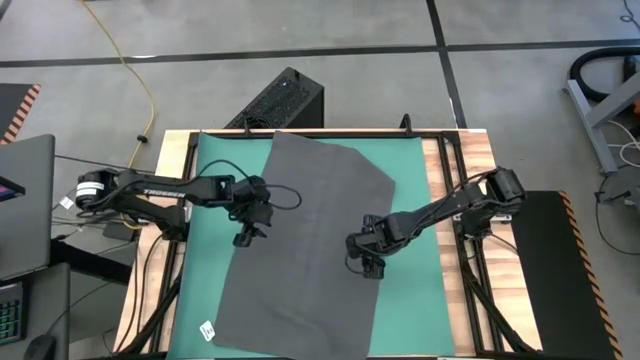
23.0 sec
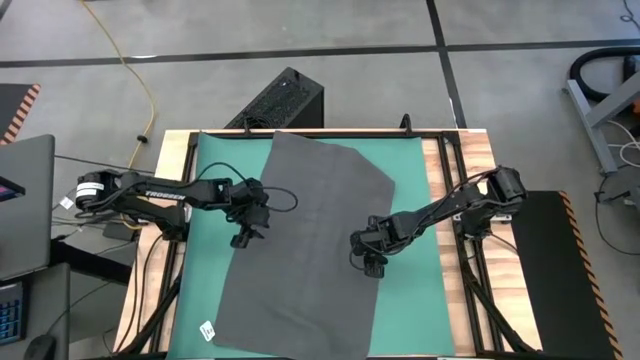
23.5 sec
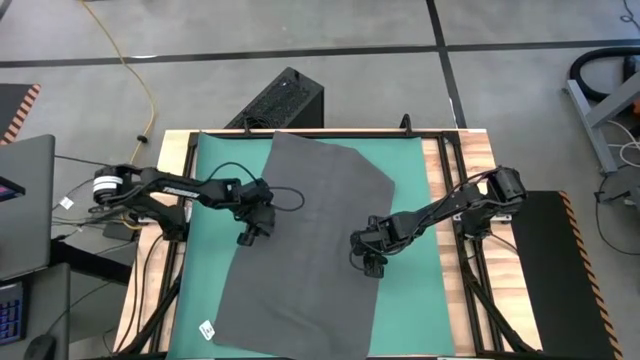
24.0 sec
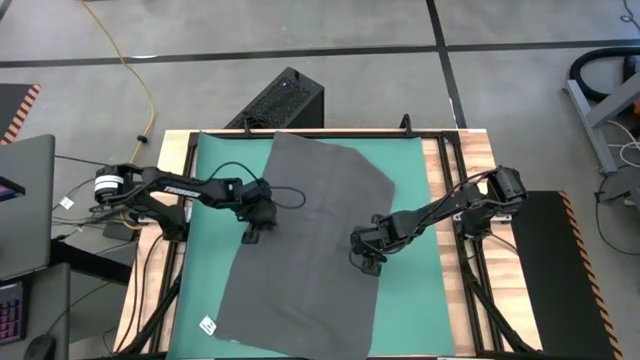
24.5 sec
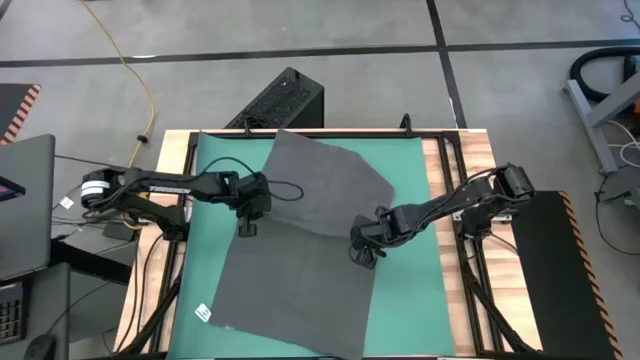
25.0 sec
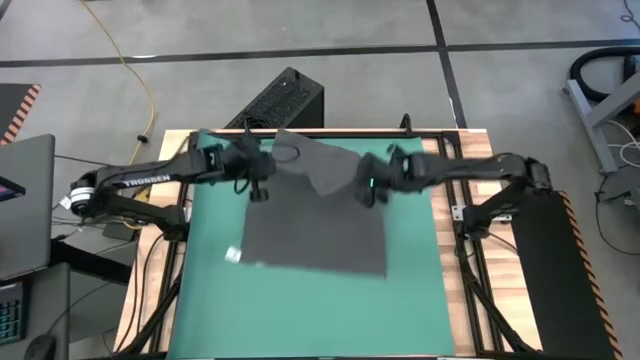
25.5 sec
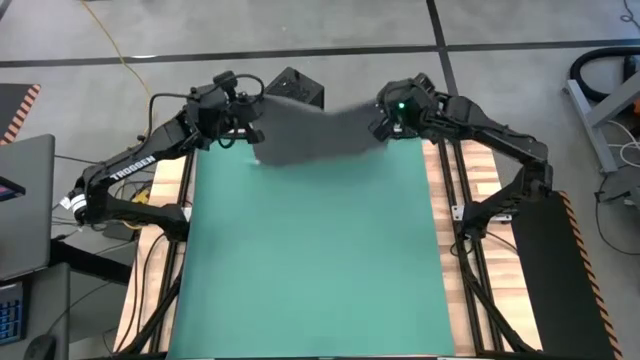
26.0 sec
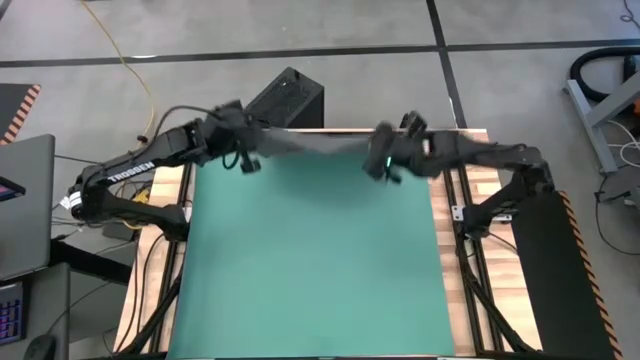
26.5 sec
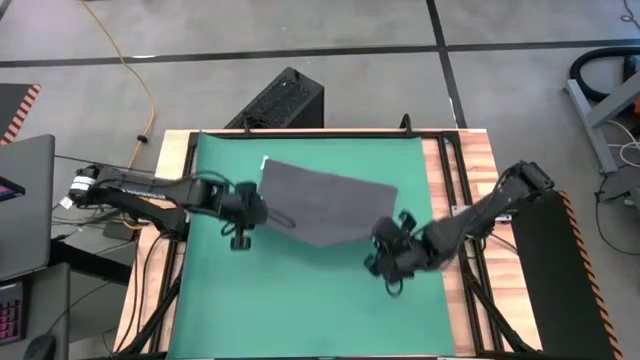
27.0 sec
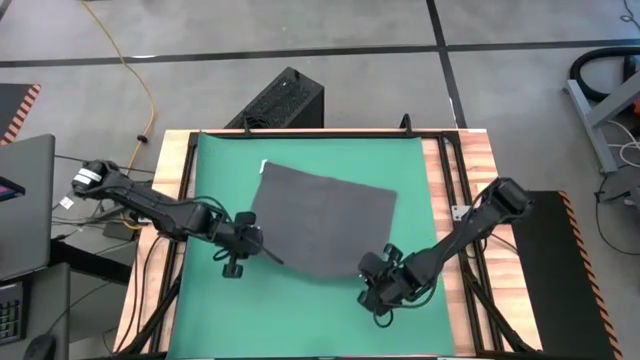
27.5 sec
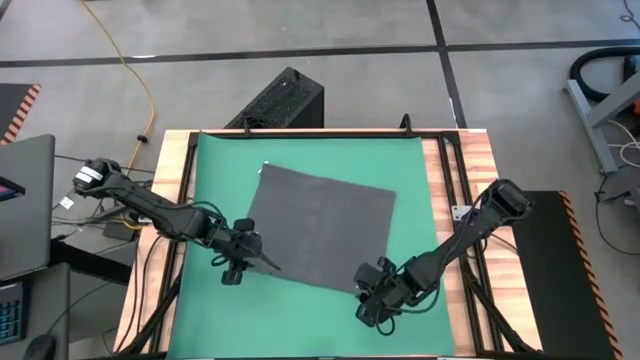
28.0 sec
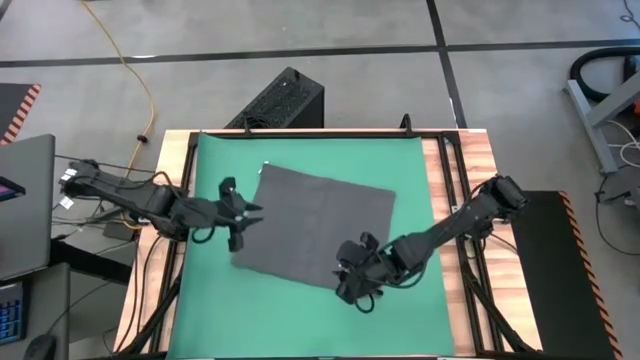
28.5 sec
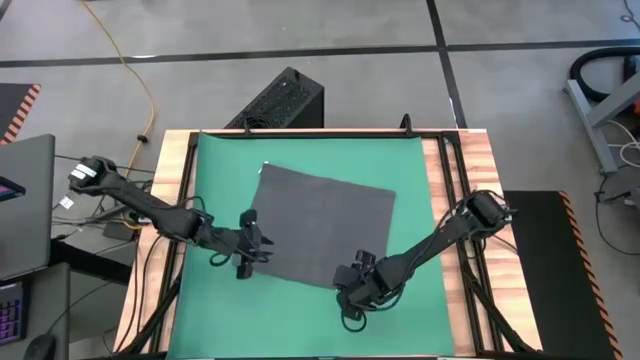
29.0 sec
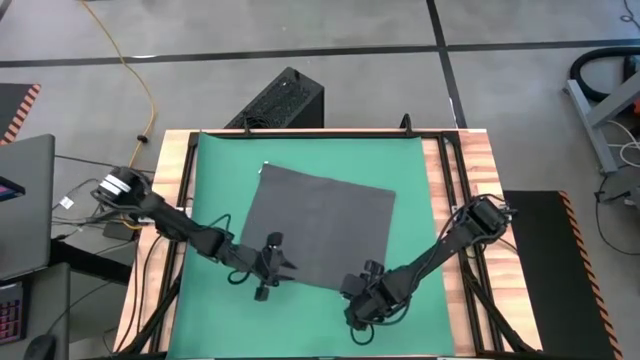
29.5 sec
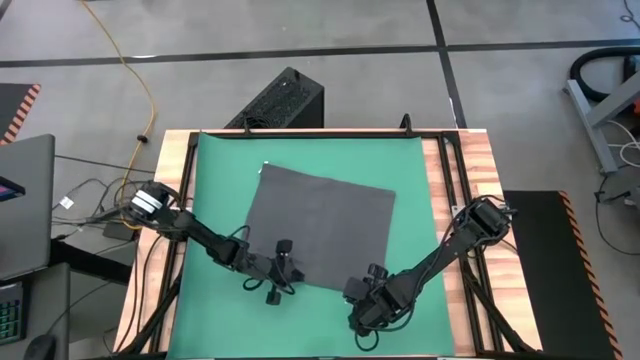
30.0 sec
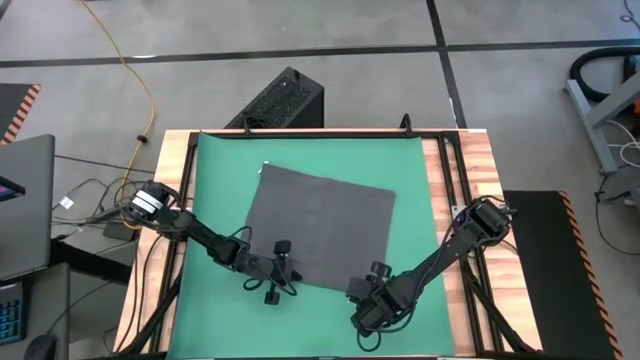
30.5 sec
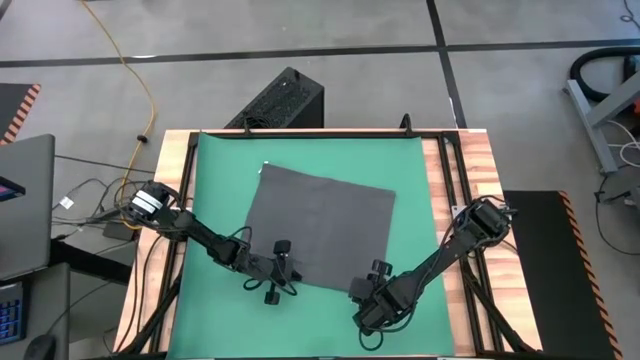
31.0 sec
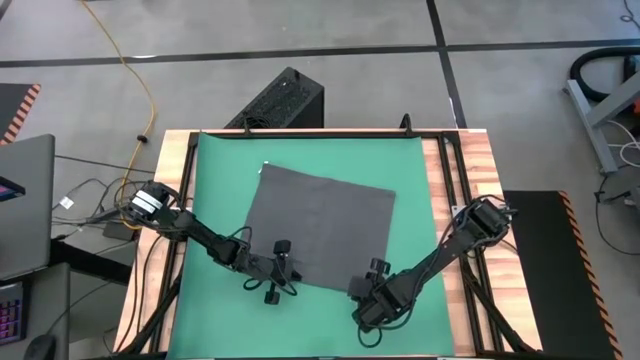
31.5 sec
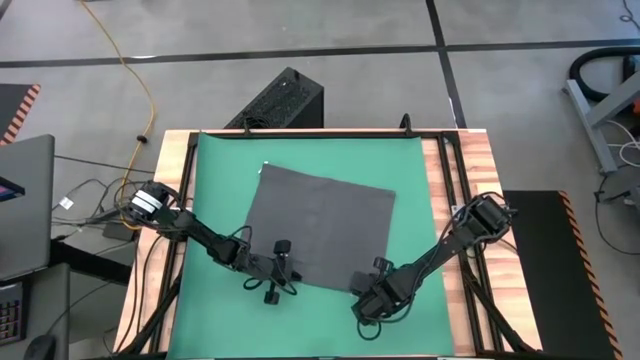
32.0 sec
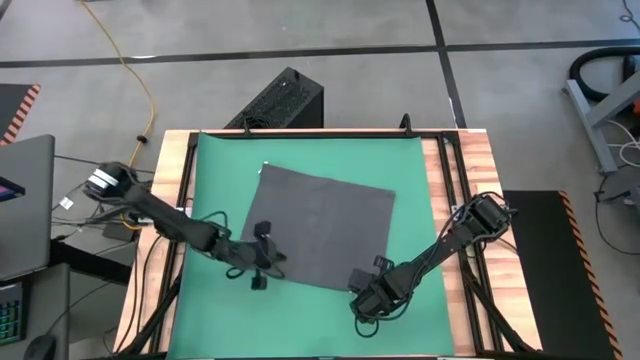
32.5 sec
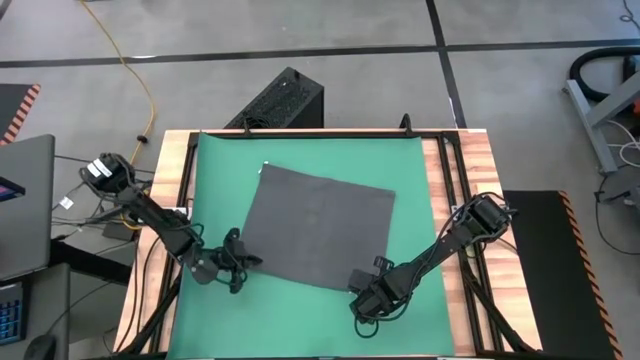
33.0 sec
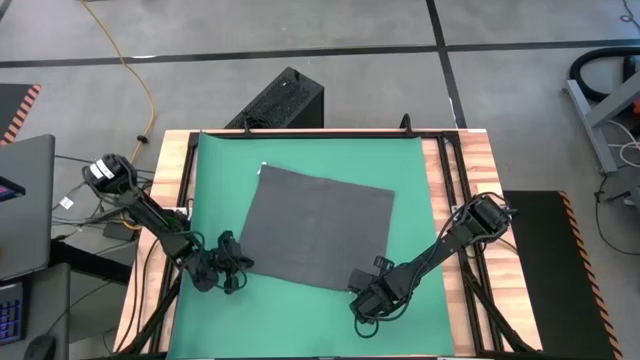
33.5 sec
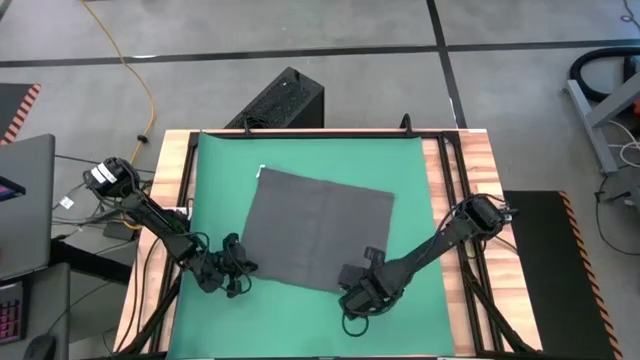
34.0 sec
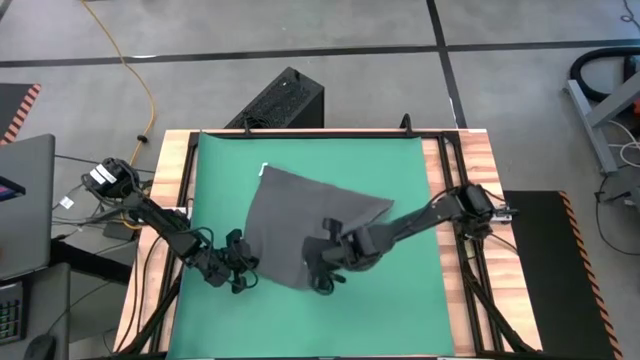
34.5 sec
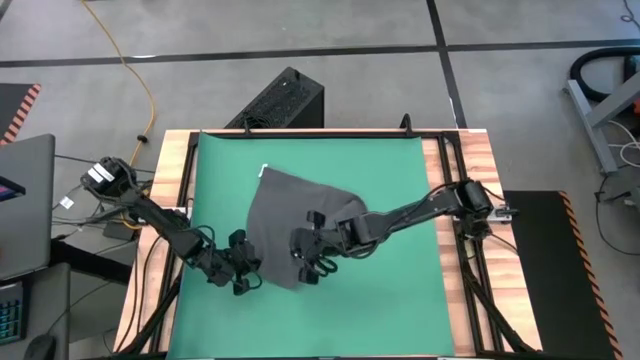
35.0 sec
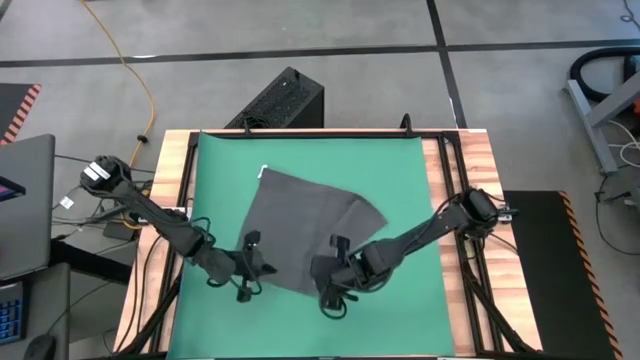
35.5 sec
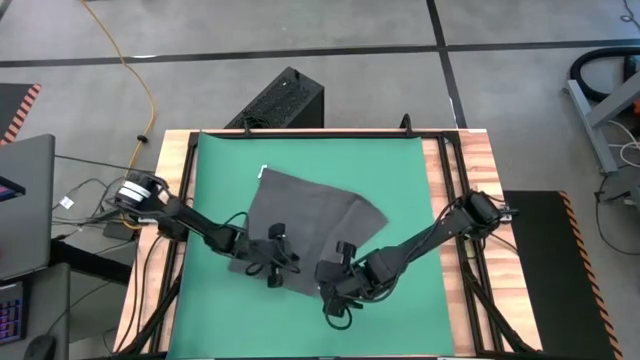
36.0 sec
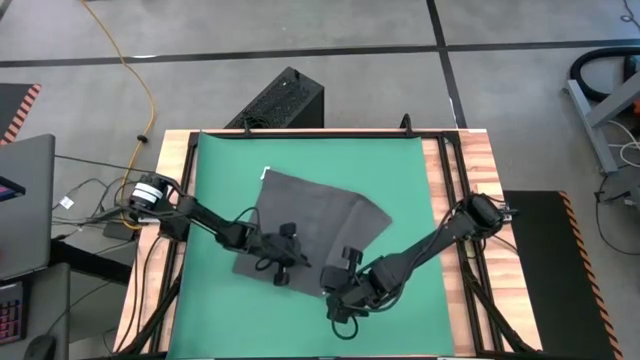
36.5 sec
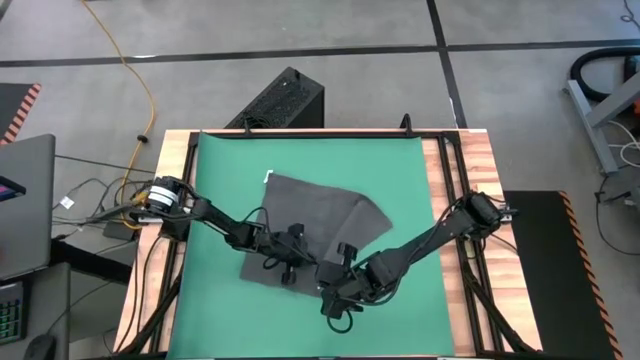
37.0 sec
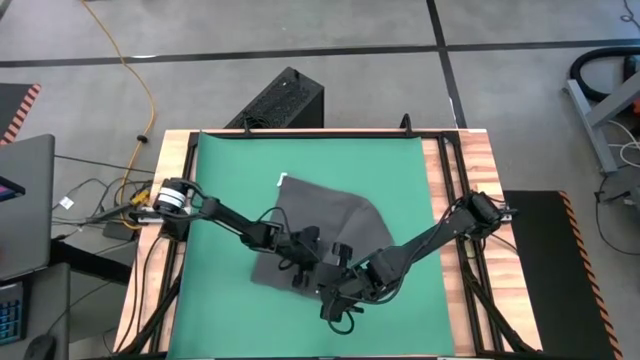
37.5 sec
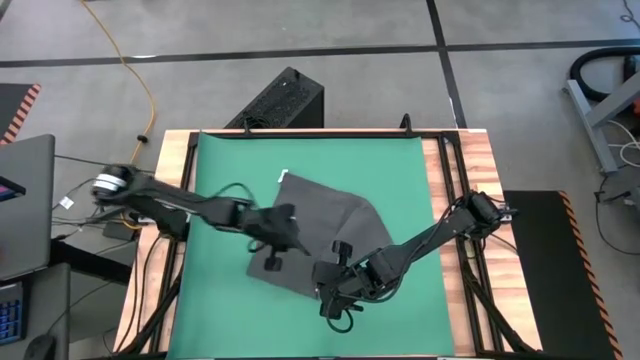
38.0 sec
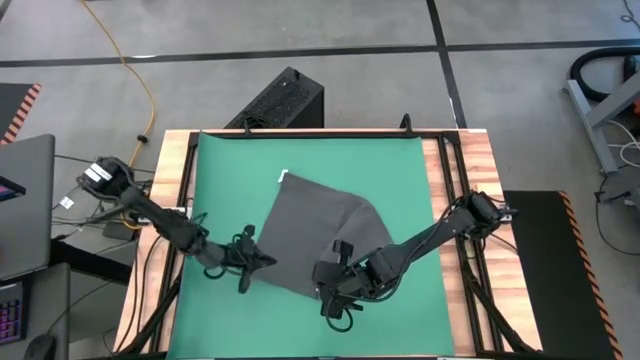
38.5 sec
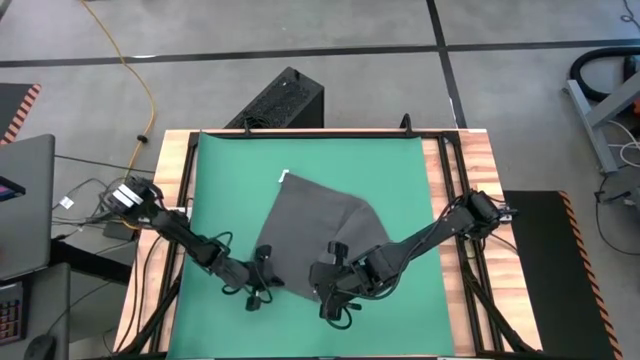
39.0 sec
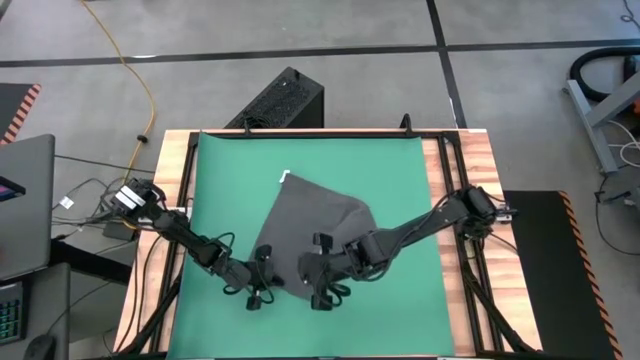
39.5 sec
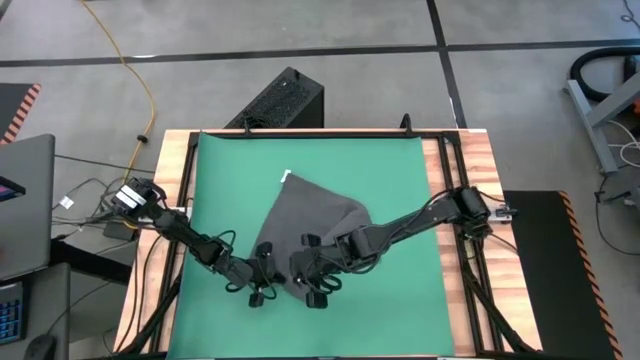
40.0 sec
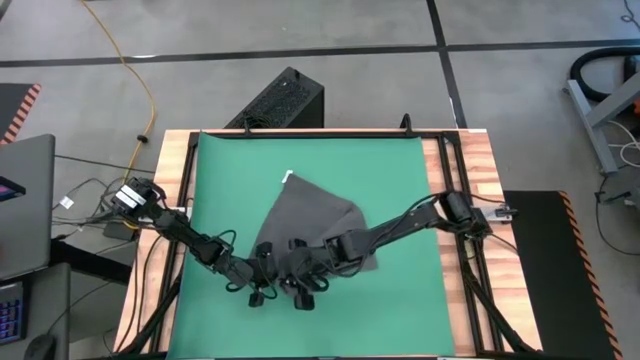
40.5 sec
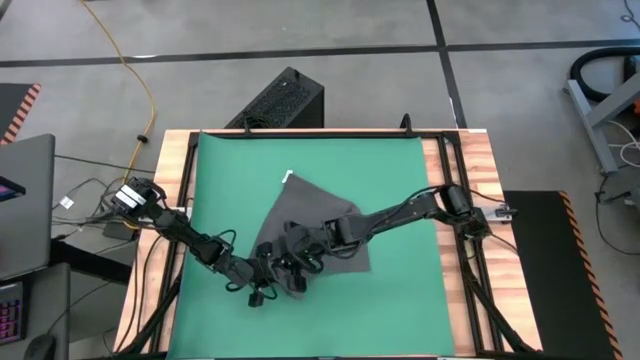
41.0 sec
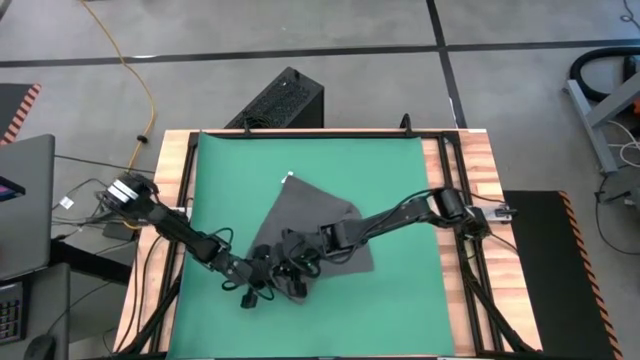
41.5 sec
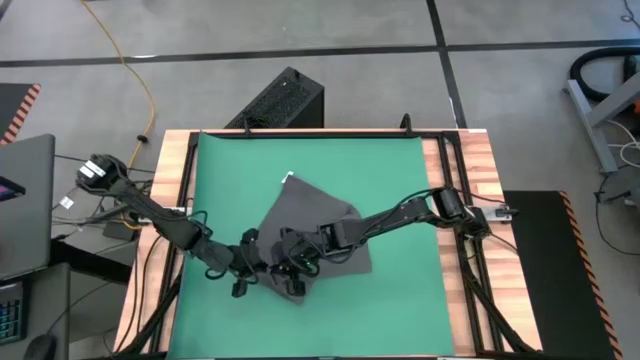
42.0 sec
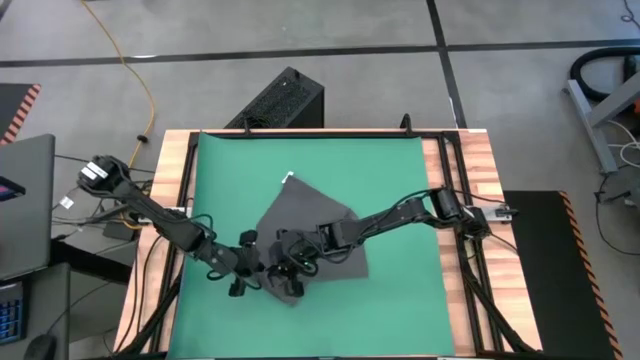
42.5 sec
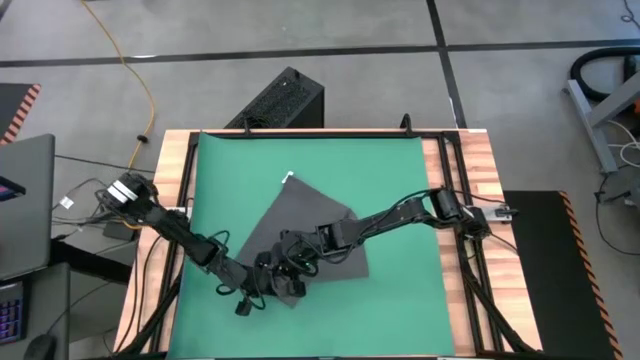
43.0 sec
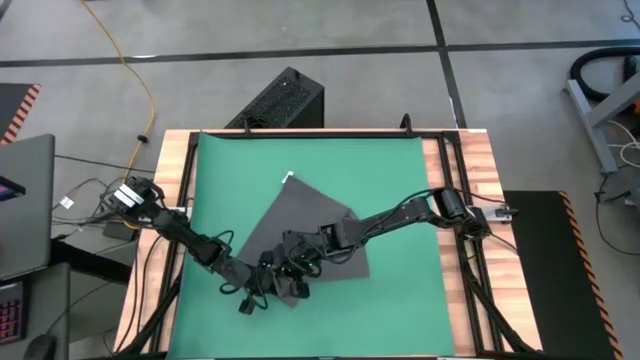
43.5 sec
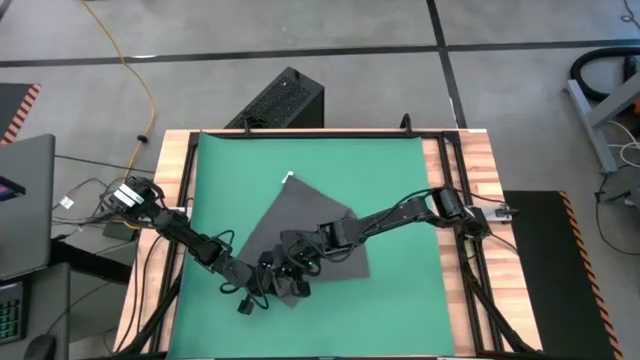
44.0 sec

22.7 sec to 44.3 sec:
Task: Roll towel into tight, uniform cylinder
Roll the gray towel
